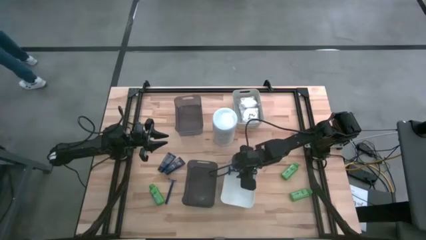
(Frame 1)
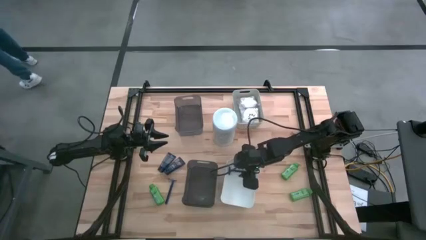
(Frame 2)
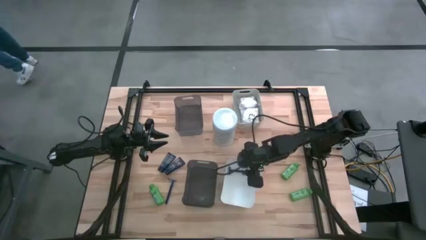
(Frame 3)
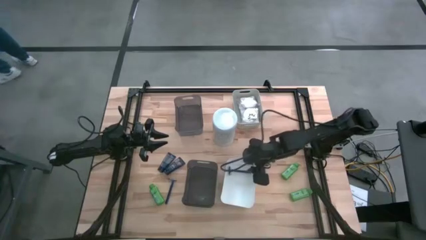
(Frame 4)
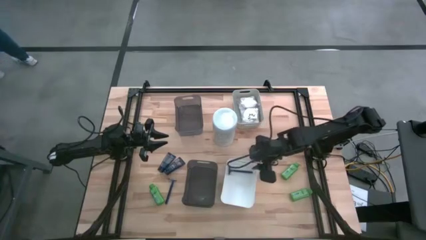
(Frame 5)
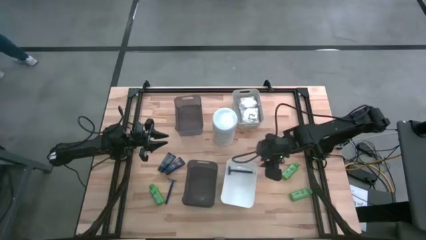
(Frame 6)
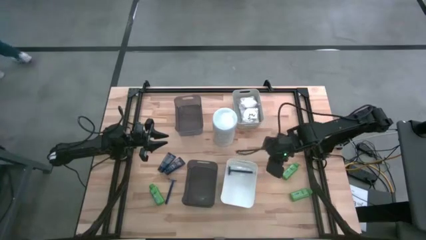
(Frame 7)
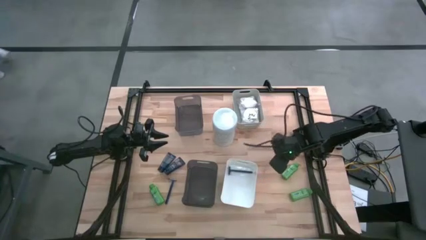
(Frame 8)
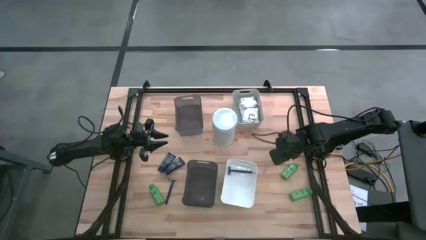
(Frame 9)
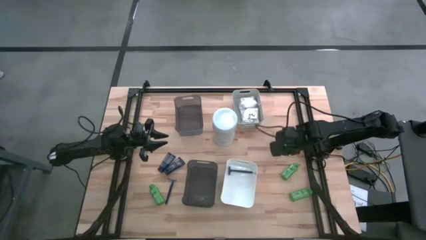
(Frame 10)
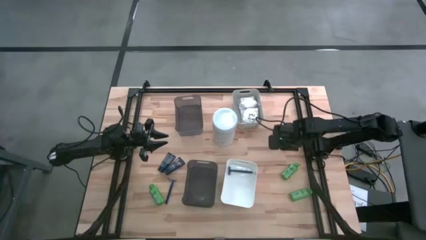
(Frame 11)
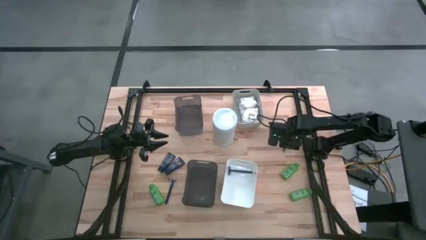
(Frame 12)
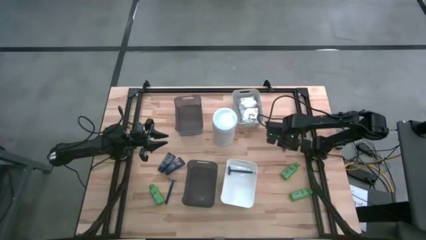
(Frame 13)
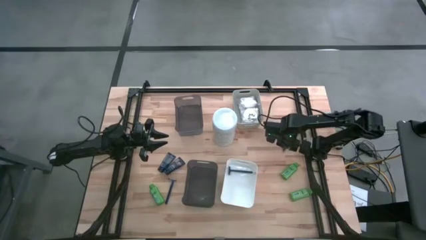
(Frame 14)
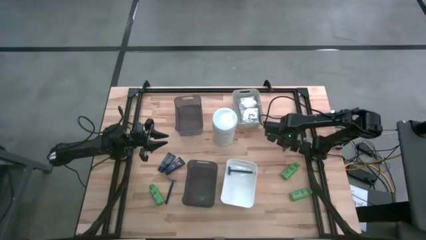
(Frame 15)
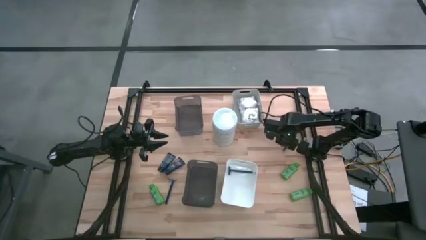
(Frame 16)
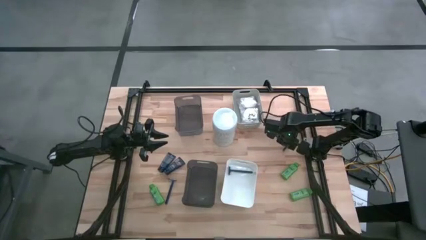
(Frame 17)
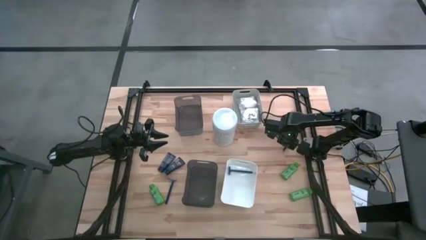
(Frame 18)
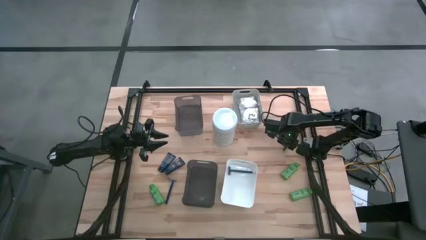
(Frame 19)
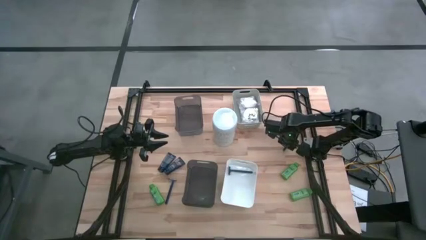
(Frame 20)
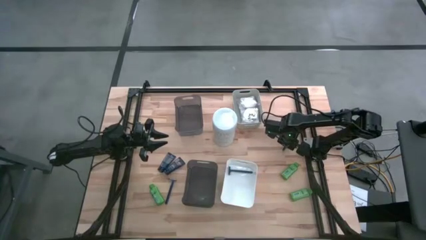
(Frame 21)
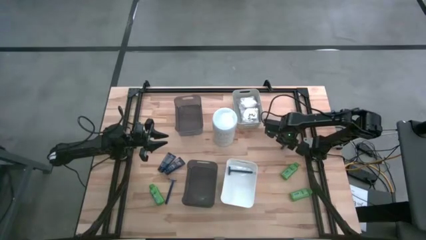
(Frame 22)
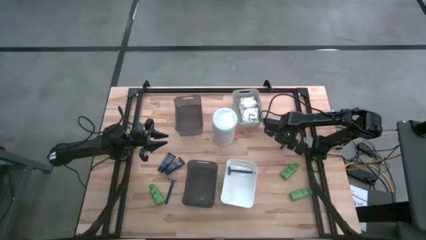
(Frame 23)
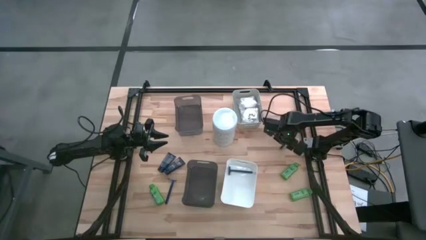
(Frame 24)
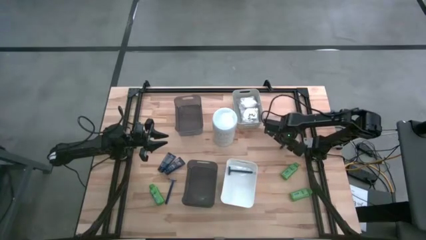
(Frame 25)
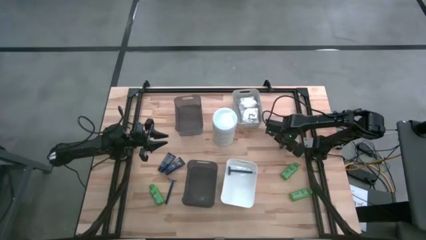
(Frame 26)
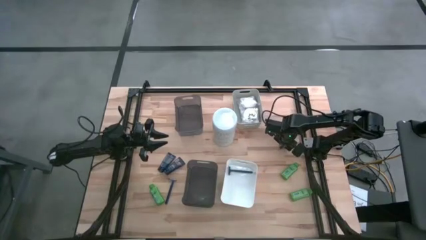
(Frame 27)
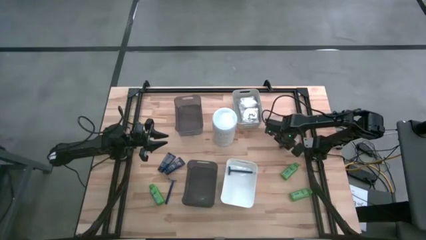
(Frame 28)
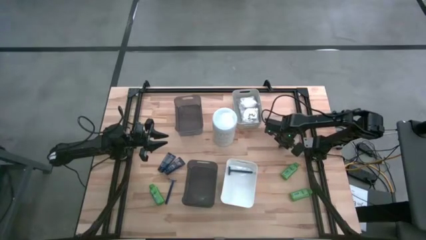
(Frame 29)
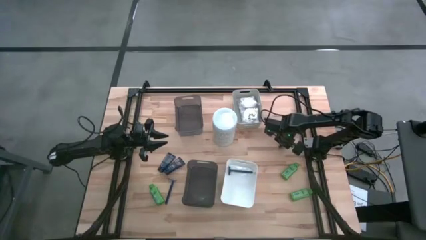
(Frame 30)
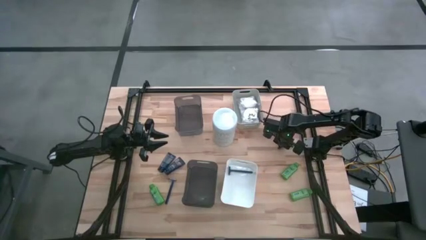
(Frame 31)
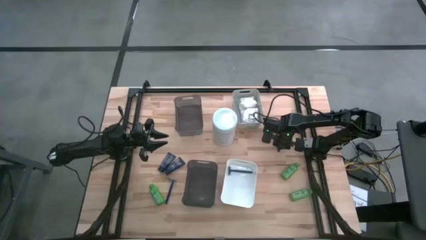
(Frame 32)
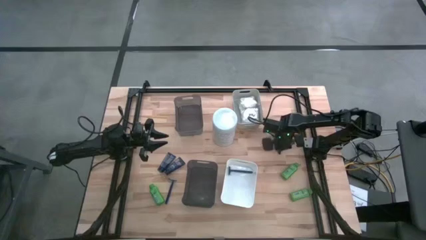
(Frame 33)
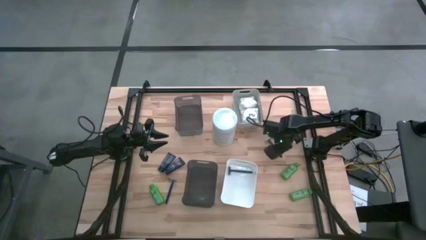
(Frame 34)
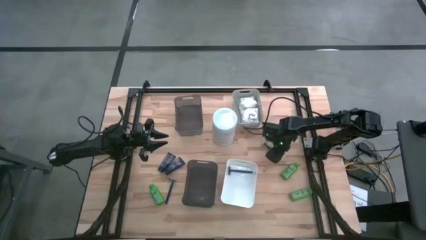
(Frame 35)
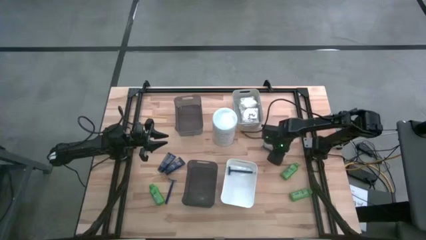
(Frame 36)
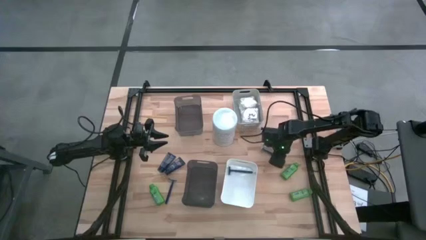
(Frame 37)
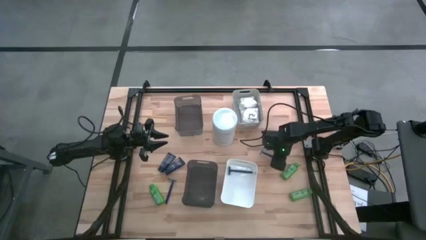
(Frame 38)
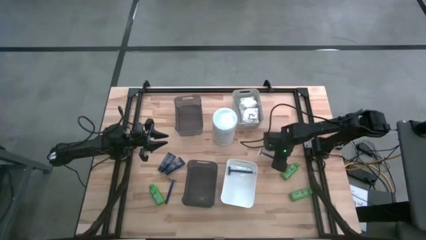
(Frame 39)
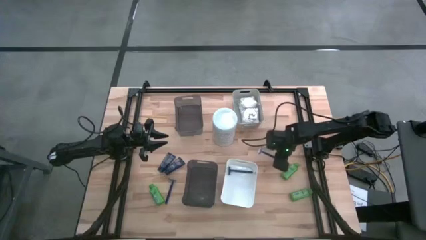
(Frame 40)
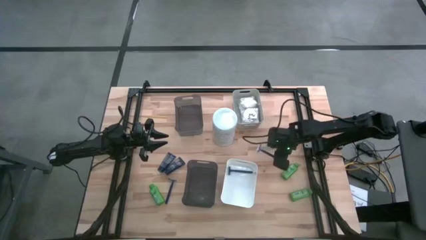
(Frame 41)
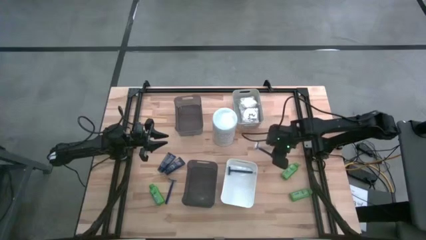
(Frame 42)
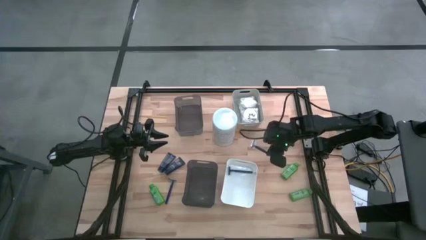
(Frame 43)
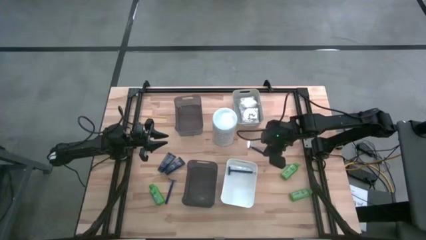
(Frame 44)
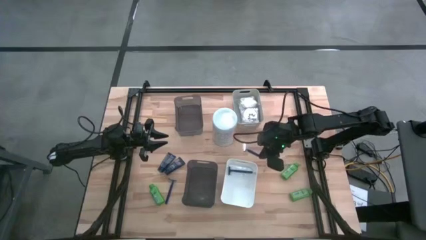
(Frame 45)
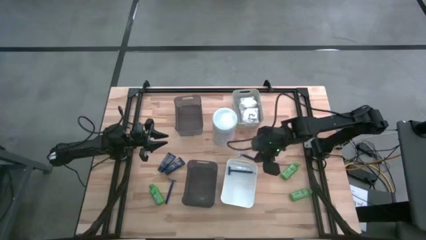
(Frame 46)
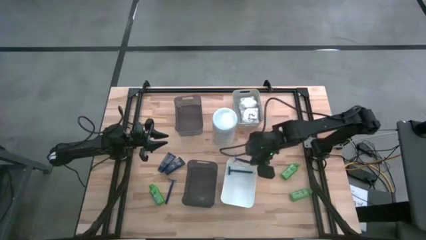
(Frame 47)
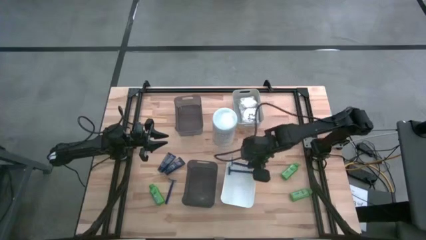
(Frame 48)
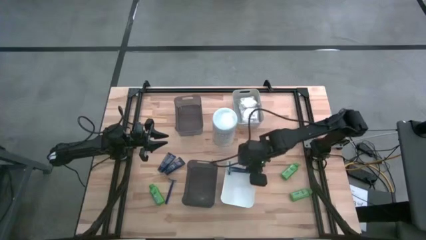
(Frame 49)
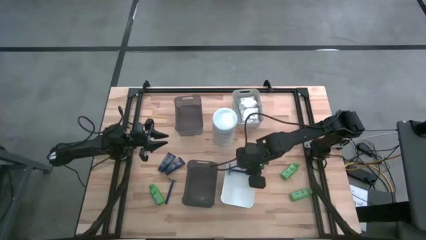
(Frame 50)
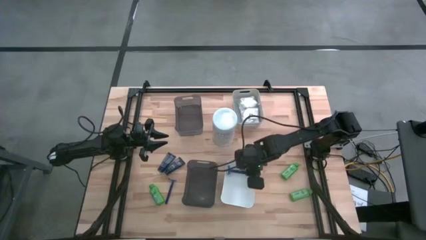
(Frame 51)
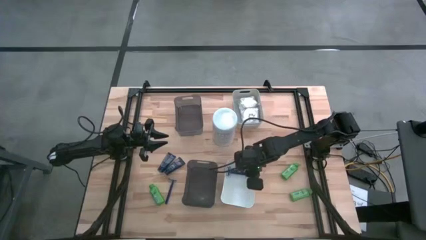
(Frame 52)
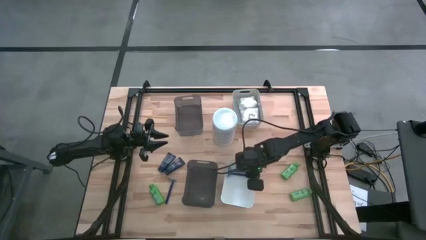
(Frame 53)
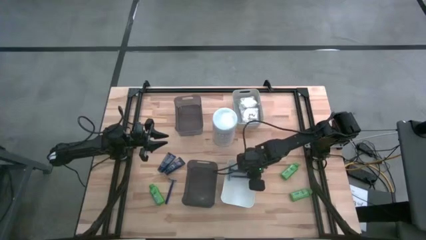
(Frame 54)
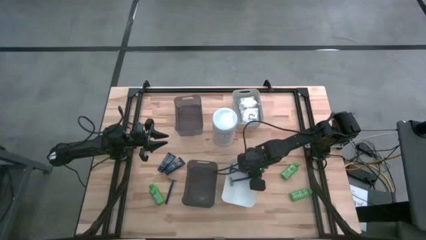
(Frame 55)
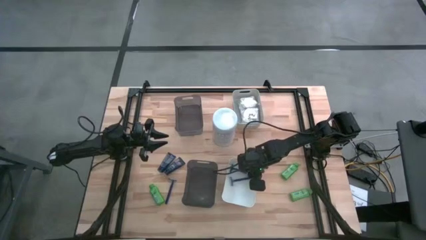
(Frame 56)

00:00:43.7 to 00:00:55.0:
Task: Pick & Place Travel size toiletries
Put the blue razor into the white bin

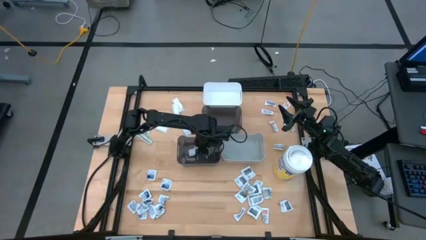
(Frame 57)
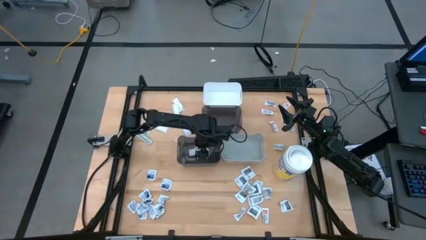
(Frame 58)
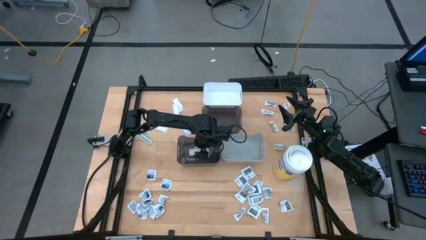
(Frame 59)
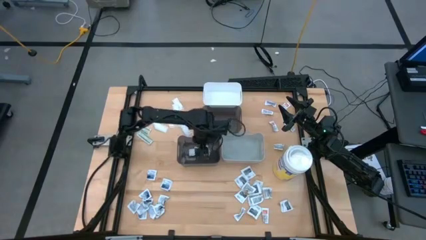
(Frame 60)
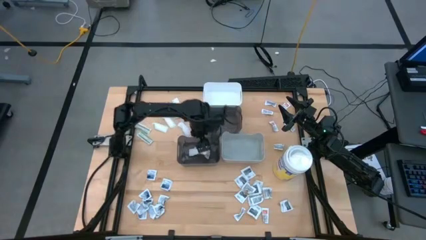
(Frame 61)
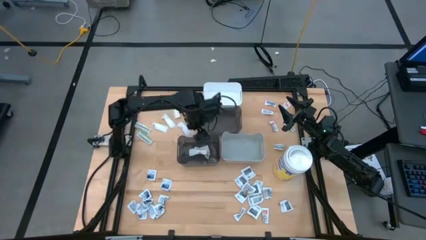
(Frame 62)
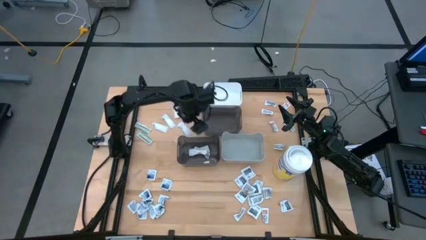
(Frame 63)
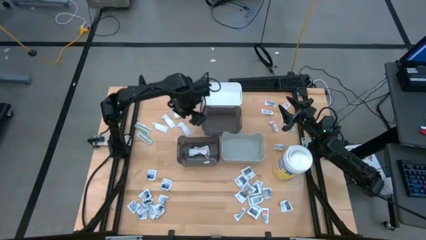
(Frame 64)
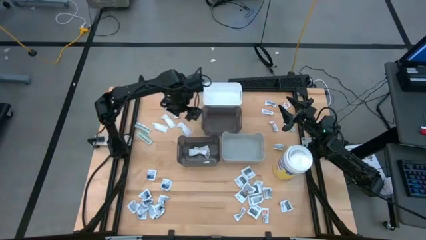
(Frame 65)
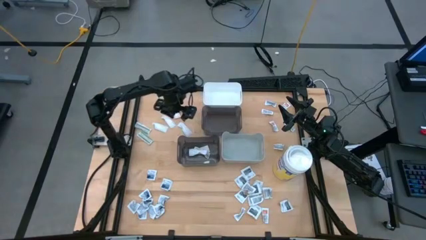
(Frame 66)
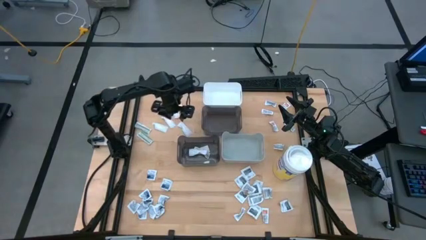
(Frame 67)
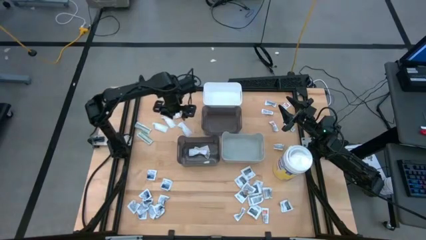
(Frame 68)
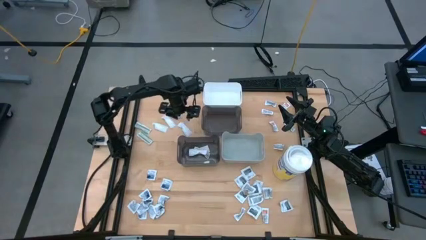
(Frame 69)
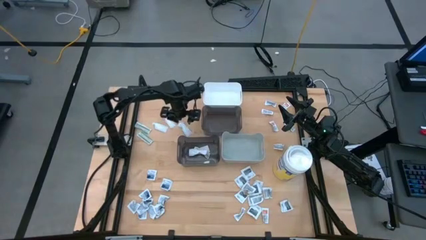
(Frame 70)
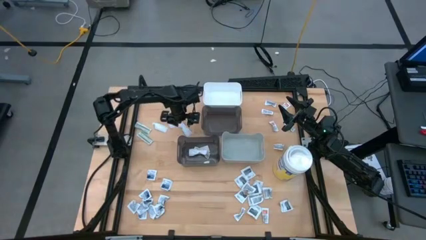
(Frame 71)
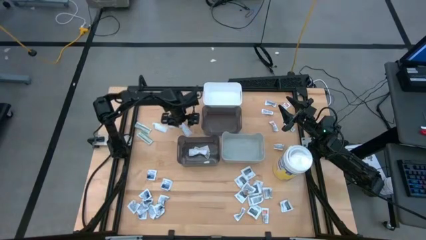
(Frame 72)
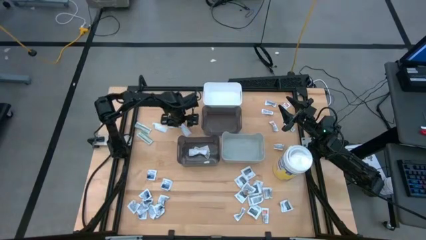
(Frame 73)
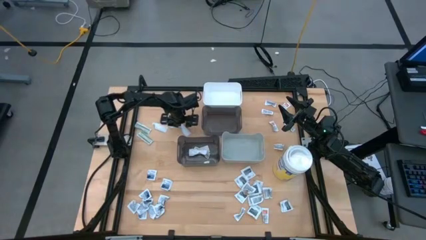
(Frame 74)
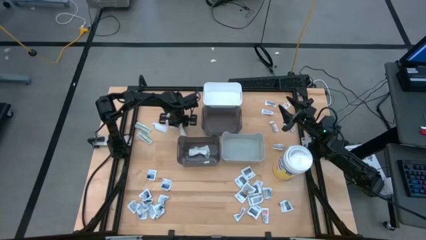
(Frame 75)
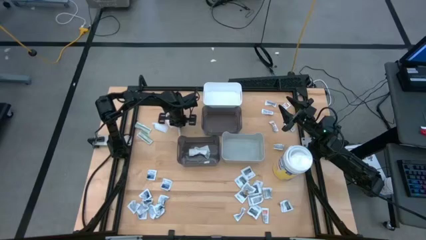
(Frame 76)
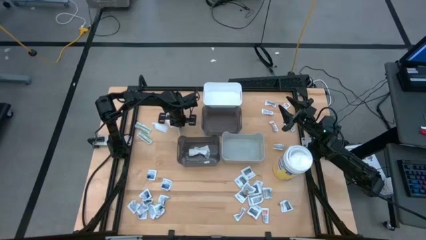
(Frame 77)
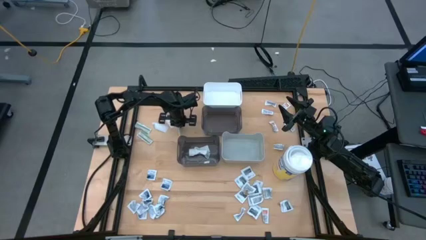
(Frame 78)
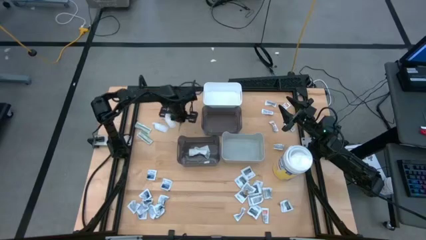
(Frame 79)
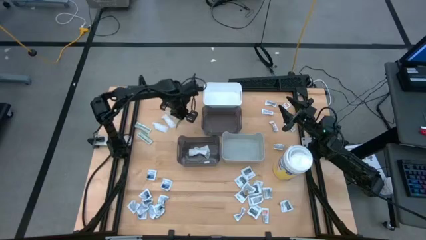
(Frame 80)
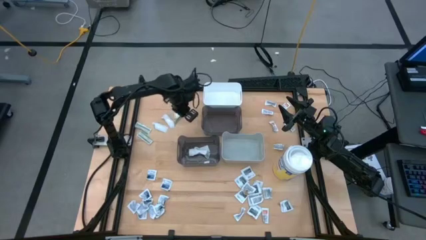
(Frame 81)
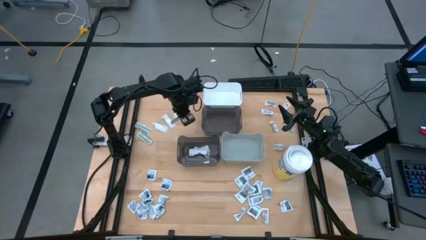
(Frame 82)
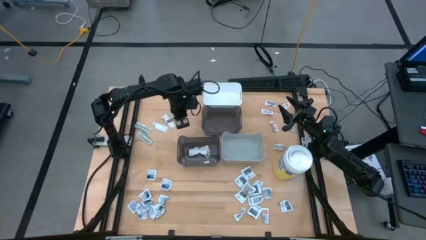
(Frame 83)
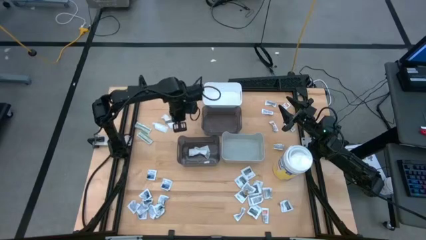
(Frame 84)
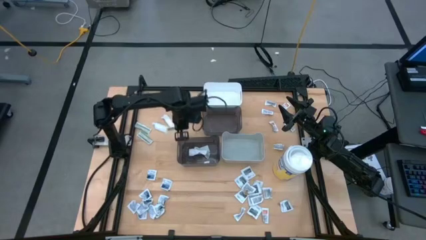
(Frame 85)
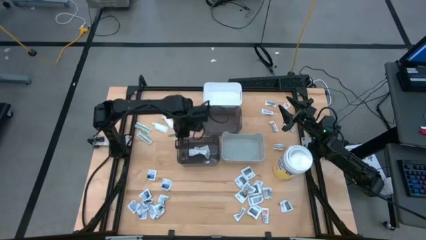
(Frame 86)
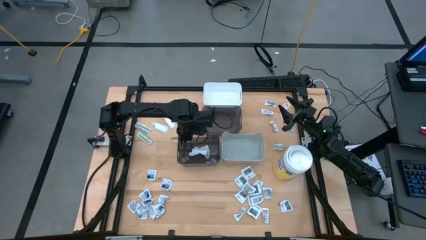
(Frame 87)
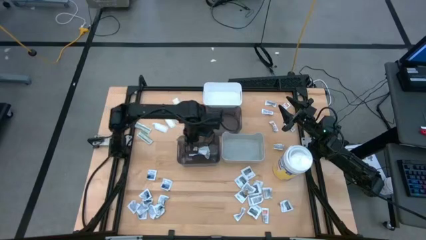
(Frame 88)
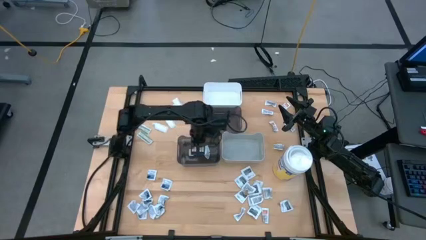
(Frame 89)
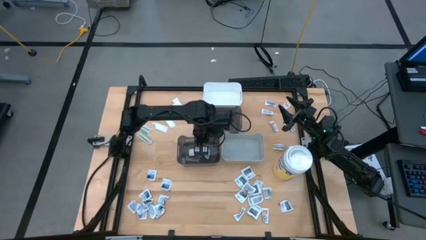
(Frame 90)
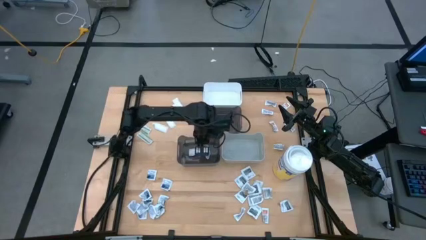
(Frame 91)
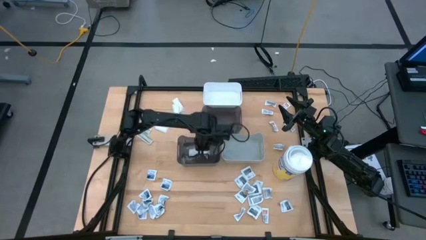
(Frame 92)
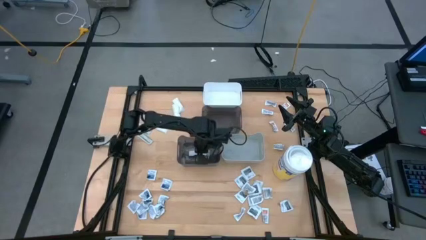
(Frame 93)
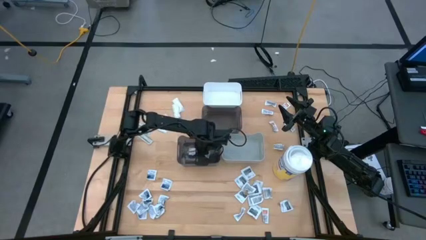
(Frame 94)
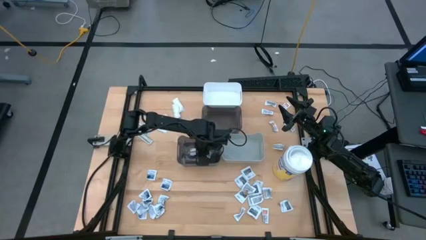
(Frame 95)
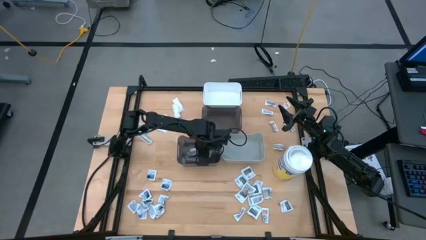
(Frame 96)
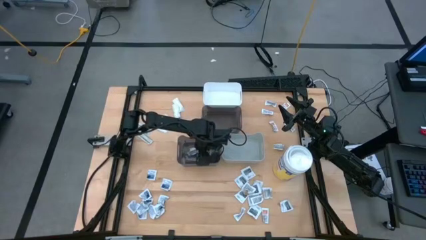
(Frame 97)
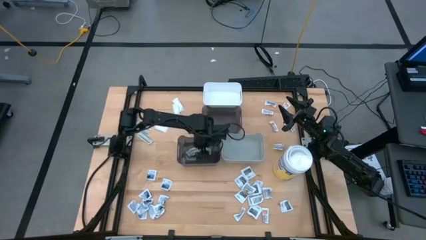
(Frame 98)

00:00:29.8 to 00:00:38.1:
Task: Pick & Place First Aid Supplies
Put the white bandage into the bottom black bin
